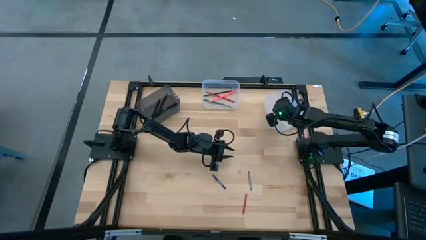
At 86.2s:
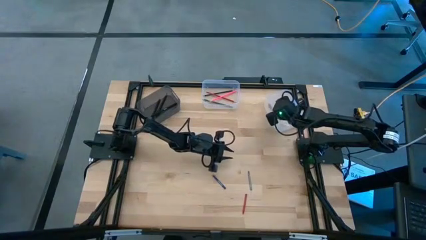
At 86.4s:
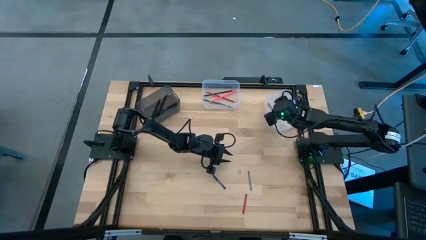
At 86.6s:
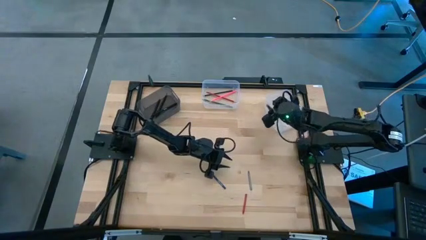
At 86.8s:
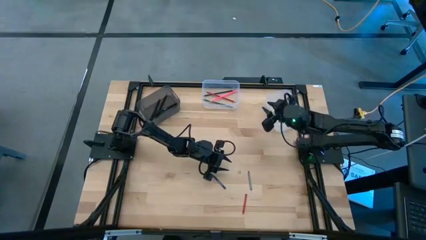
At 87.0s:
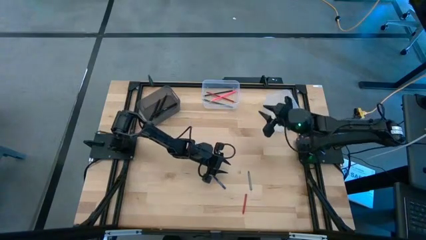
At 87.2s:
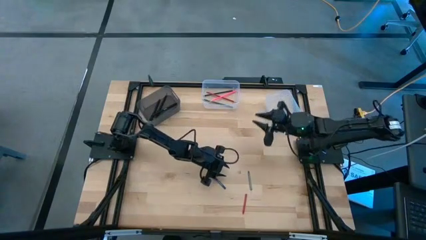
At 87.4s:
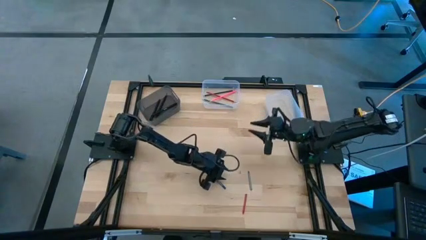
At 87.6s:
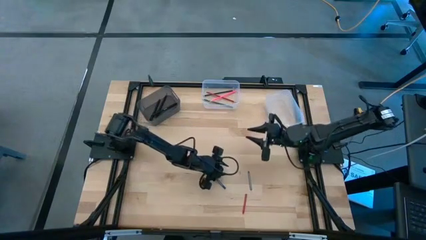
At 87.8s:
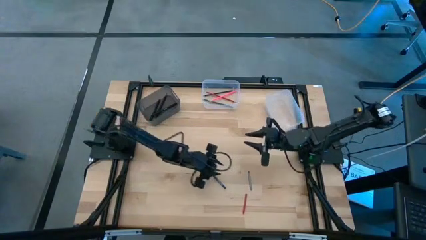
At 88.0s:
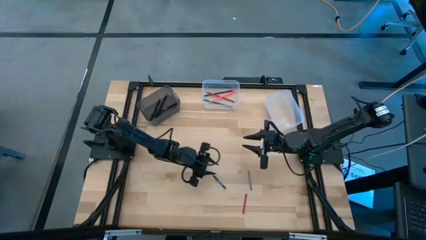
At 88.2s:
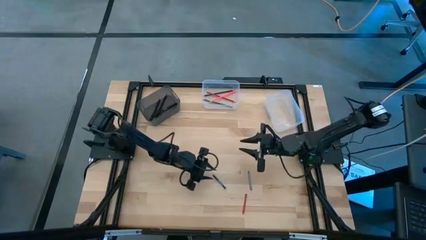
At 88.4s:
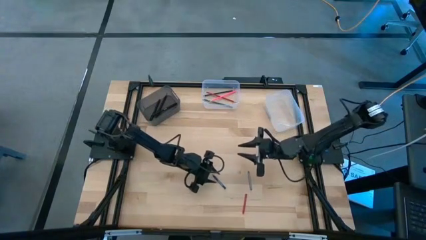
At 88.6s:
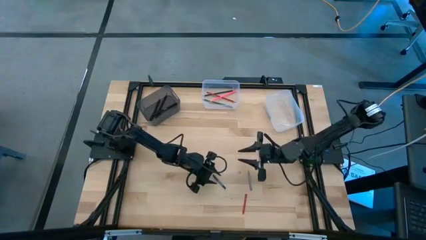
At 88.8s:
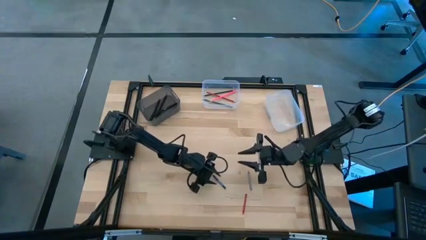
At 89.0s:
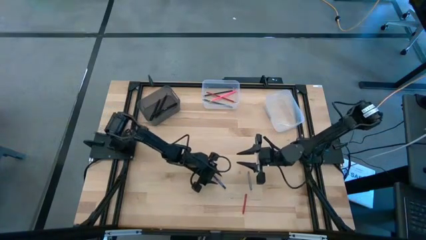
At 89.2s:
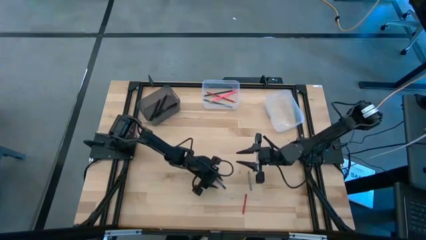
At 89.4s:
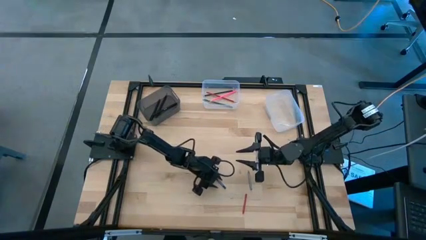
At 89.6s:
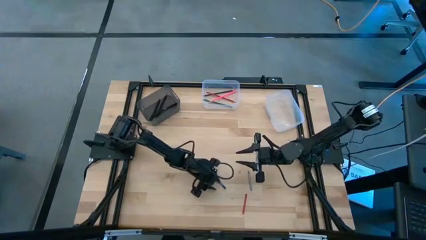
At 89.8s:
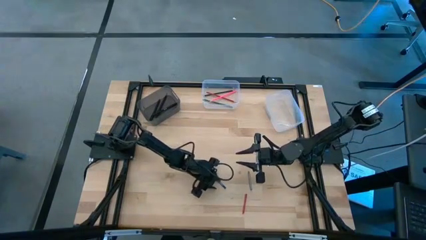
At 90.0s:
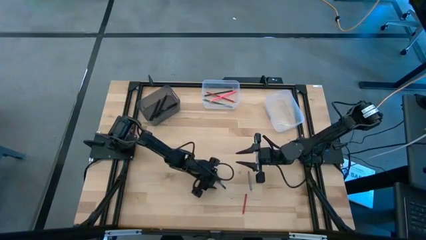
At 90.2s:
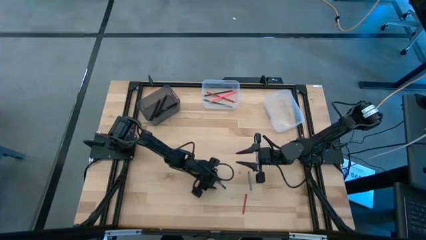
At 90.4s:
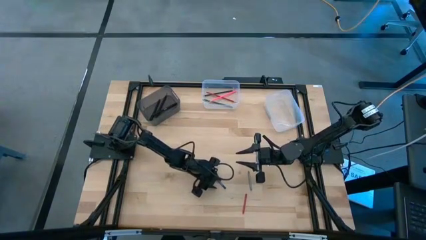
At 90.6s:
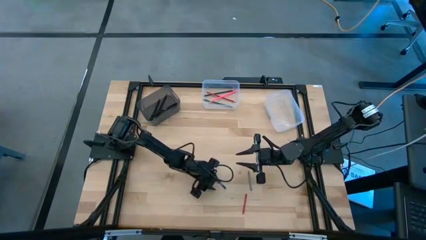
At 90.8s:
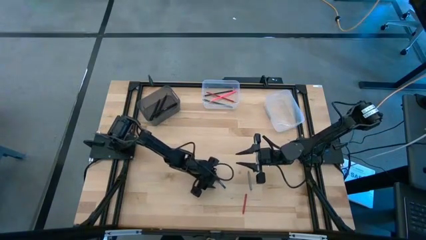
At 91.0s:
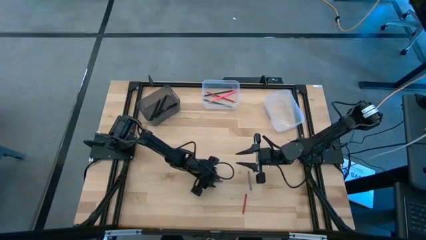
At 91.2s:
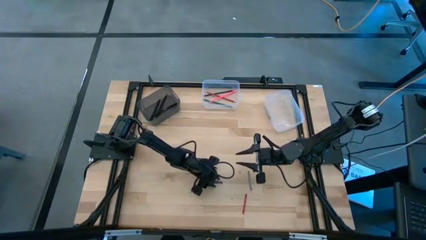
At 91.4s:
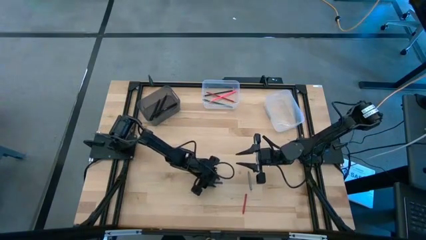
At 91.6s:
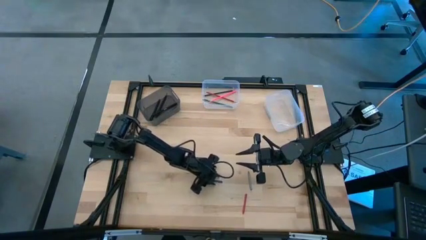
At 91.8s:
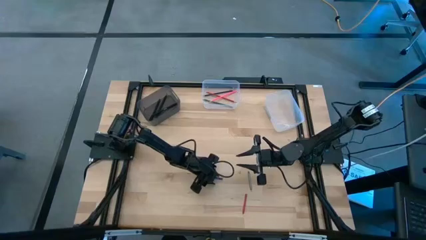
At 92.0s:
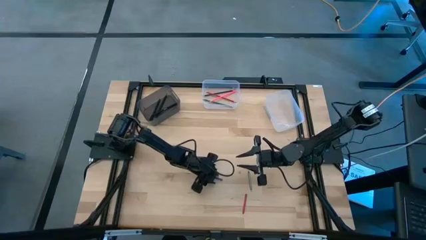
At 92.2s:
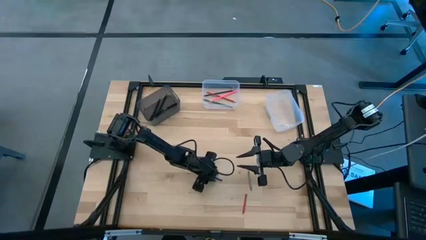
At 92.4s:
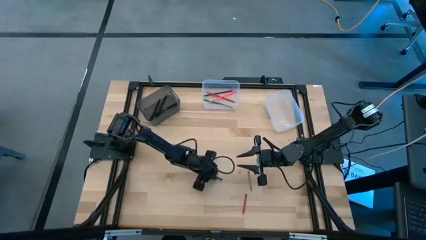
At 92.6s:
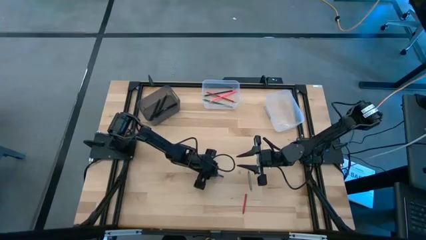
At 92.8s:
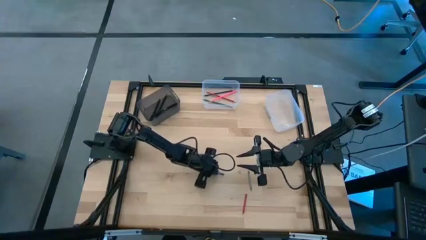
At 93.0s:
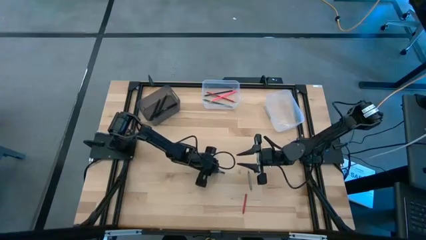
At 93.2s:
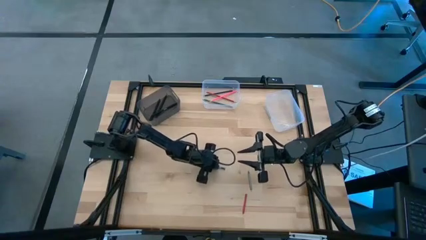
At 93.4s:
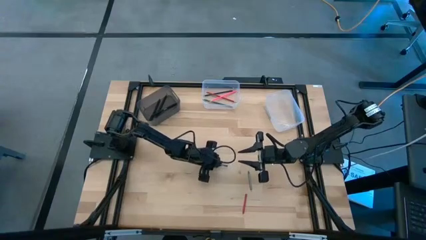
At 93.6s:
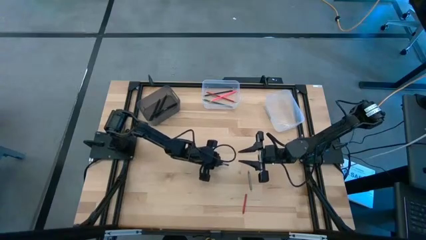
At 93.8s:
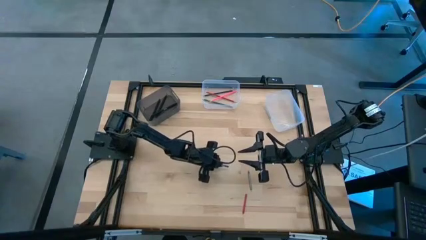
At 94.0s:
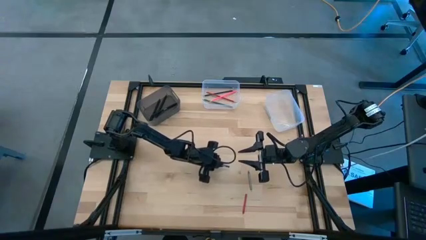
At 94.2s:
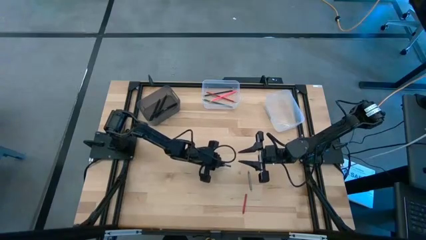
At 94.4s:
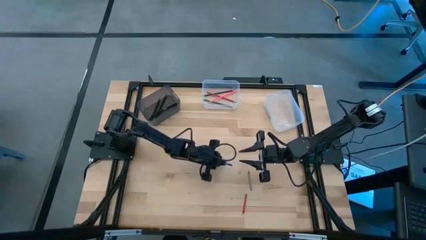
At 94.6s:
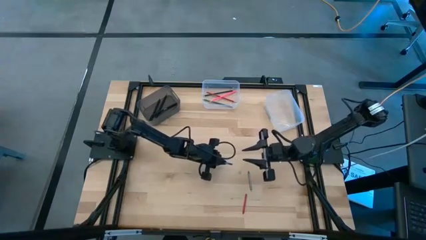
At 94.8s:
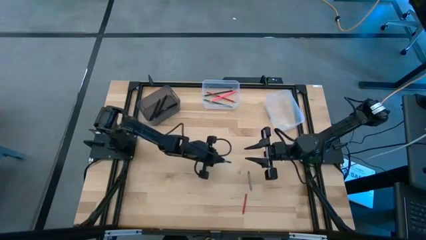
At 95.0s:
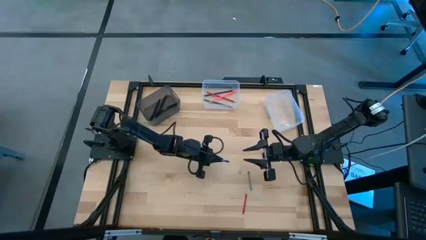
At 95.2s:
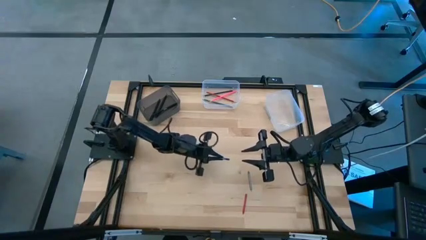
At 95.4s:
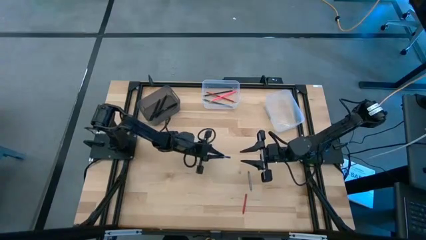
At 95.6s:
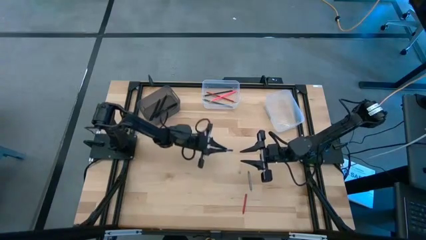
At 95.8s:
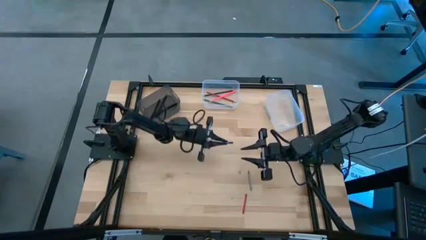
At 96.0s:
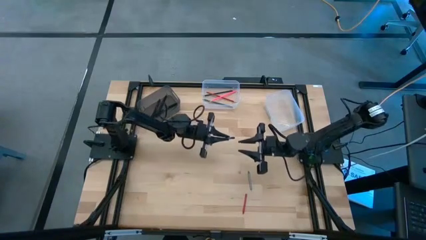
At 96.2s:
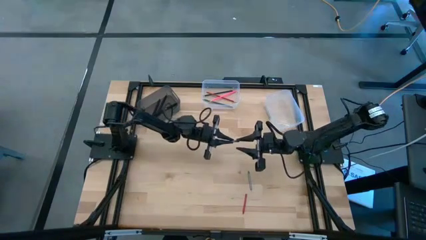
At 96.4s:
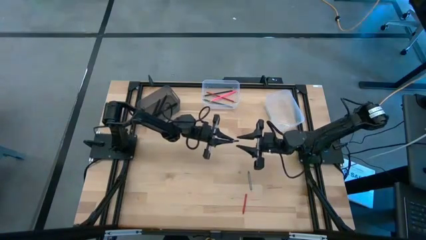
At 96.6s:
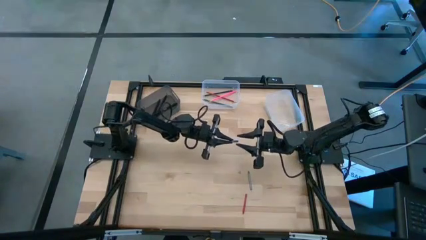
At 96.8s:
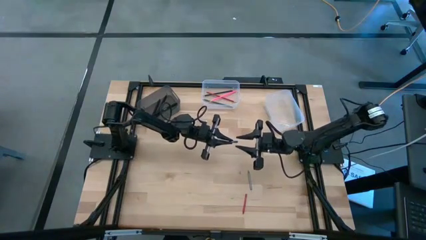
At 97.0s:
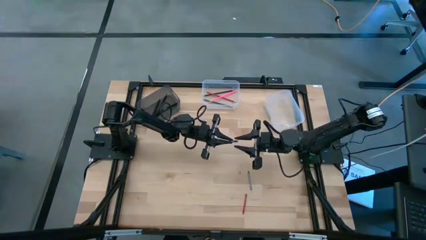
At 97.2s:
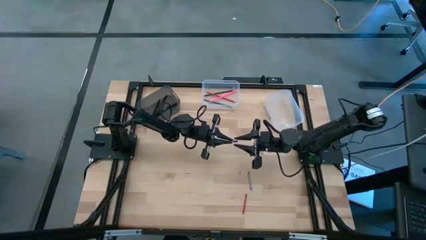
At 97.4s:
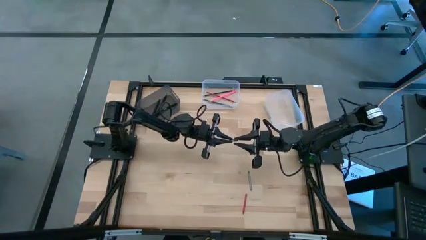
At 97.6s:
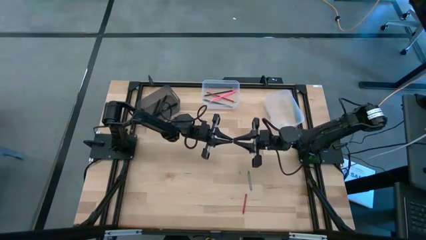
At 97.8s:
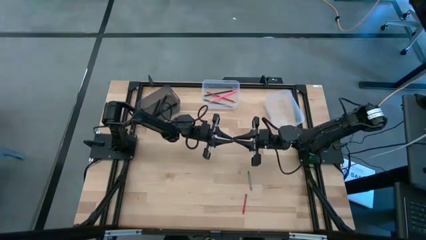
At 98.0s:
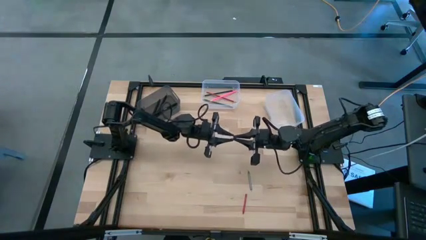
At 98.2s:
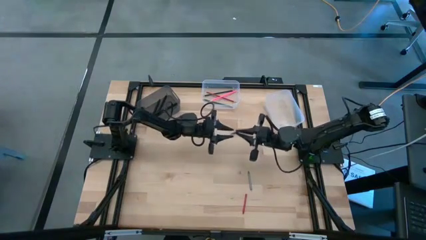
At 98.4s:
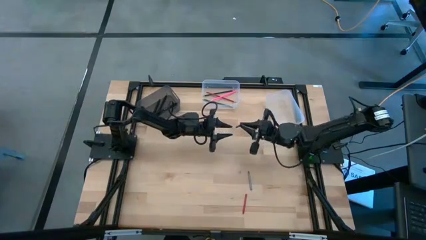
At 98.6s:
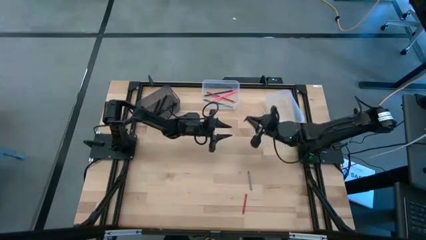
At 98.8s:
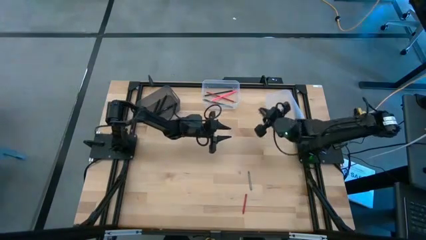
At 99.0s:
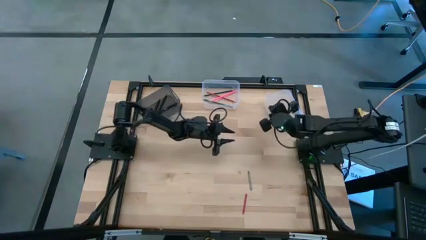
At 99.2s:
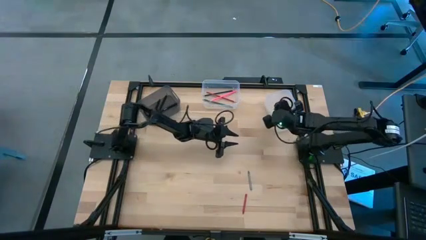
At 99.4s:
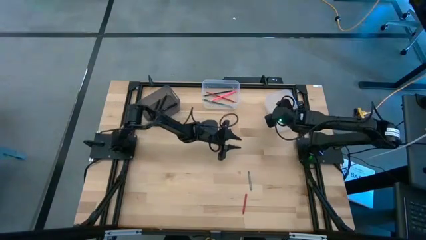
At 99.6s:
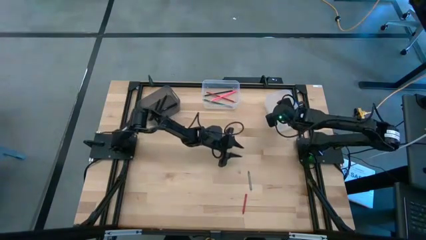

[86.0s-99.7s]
Task: Sort crayons/erasers/pens/pencils in bins
Put the blue crayon into the right transparent bin

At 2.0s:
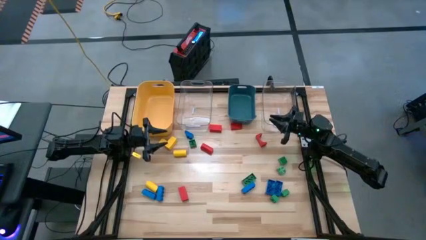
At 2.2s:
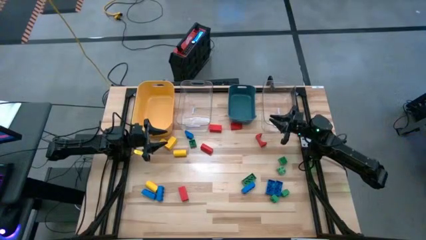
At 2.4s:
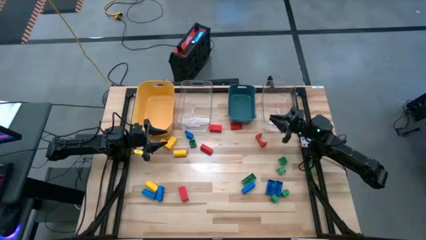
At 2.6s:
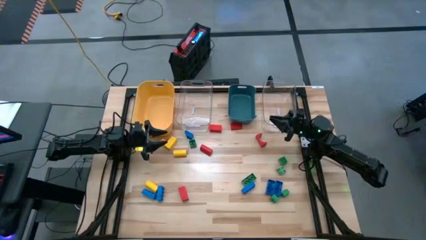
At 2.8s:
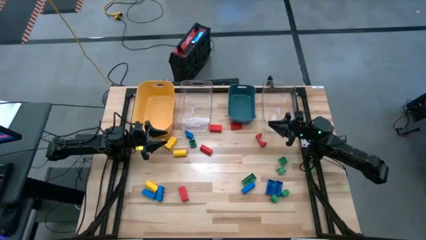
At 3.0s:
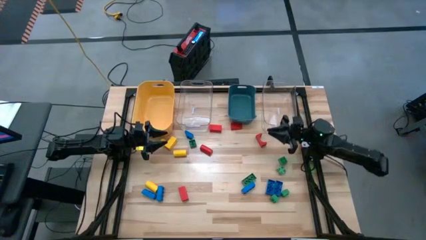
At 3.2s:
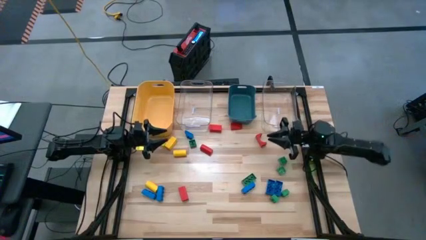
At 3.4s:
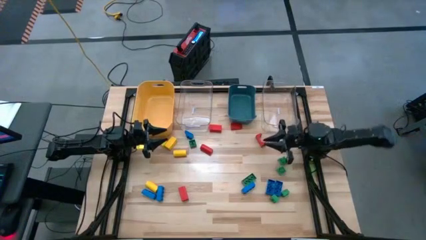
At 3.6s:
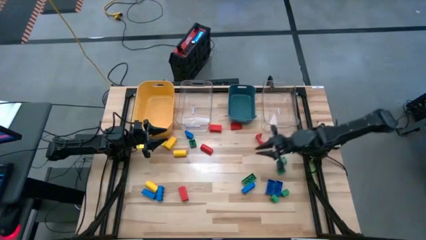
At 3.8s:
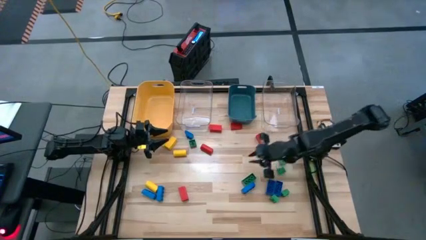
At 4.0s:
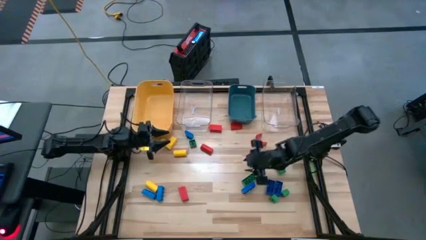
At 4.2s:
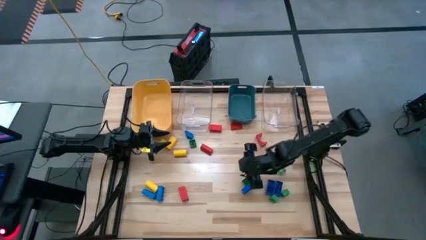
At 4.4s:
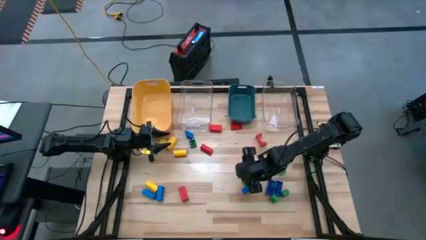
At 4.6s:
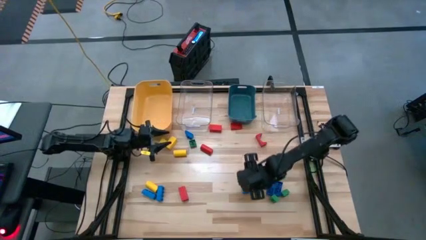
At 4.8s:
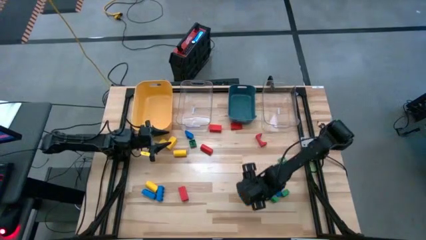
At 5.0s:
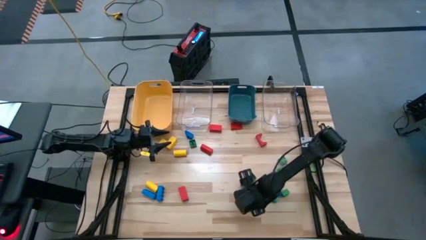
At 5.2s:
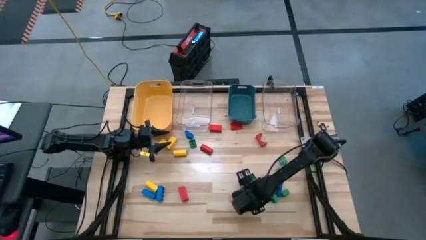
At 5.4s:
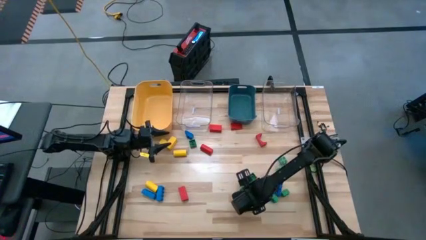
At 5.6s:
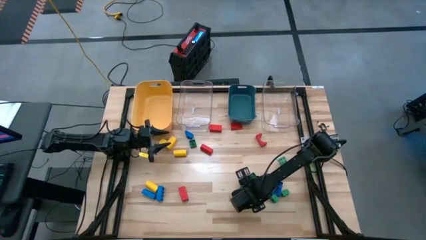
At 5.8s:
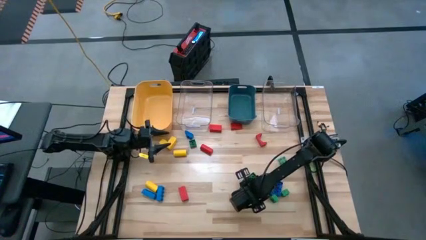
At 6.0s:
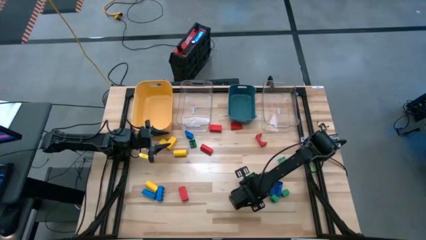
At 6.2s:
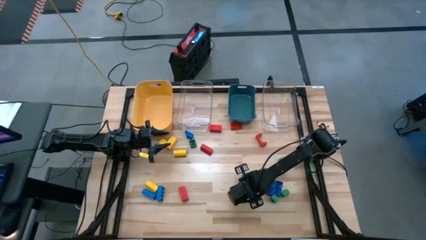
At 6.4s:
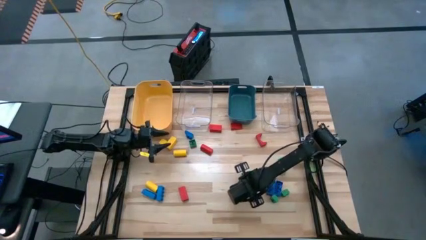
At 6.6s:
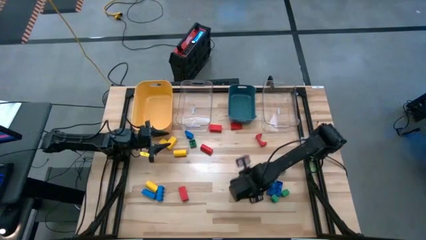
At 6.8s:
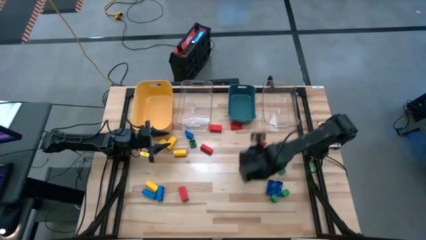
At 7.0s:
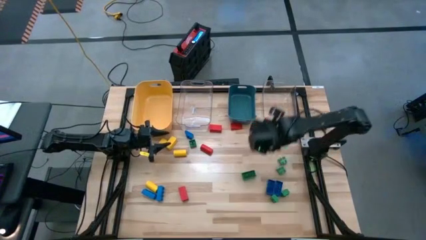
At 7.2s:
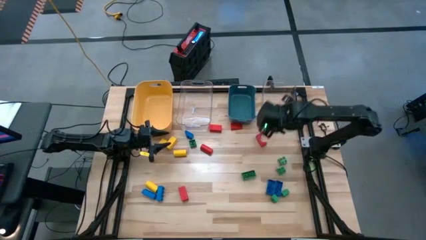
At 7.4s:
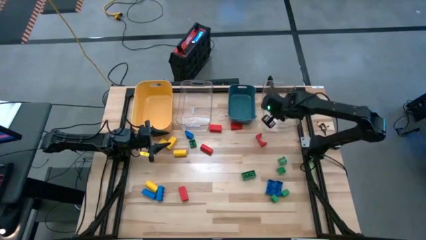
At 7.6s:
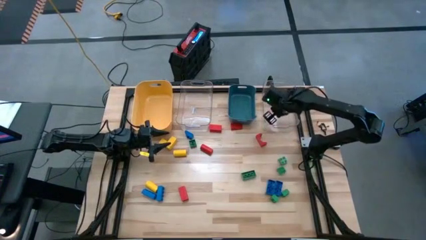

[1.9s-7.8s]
Task: Sort blocks
Put the blue game piece into the right transparent bin
